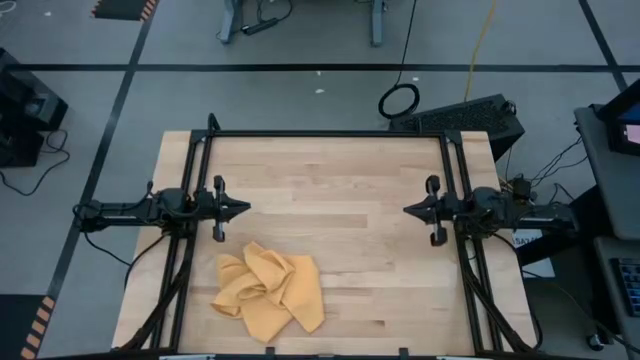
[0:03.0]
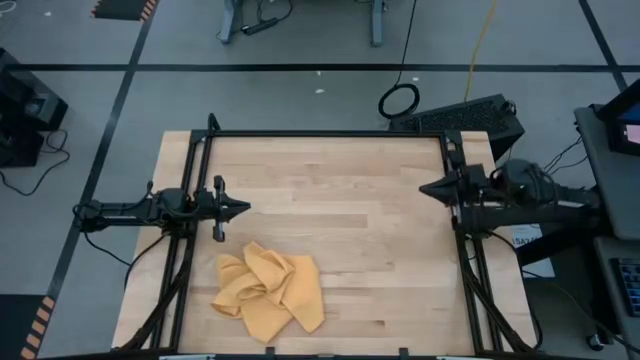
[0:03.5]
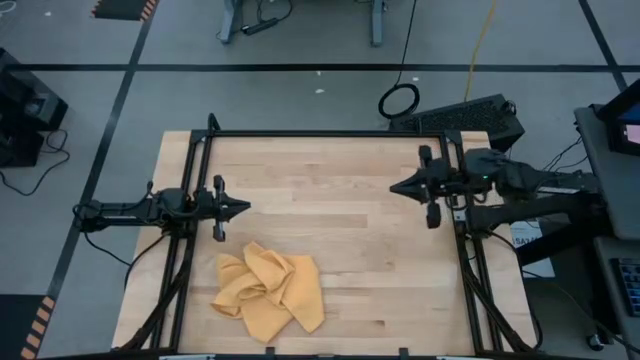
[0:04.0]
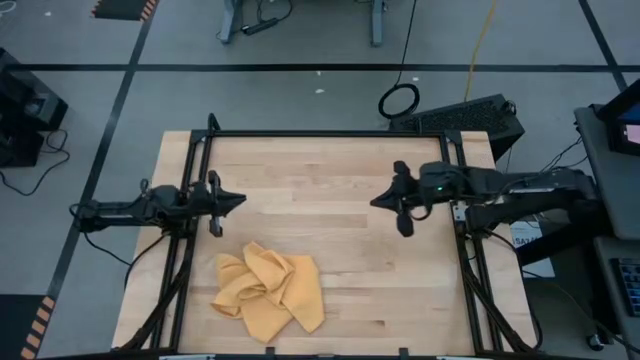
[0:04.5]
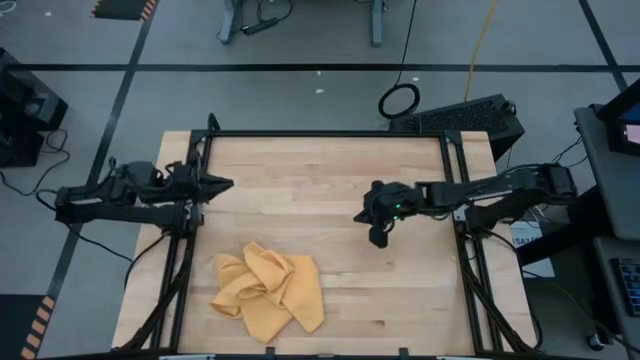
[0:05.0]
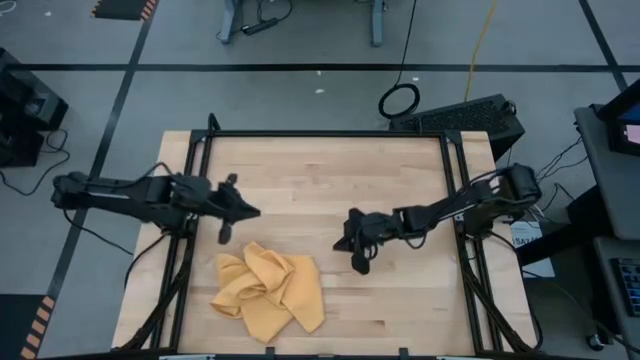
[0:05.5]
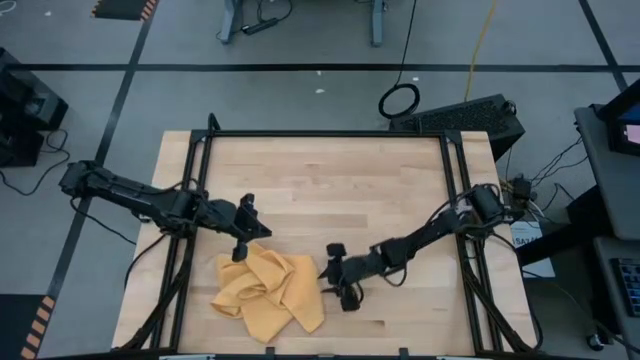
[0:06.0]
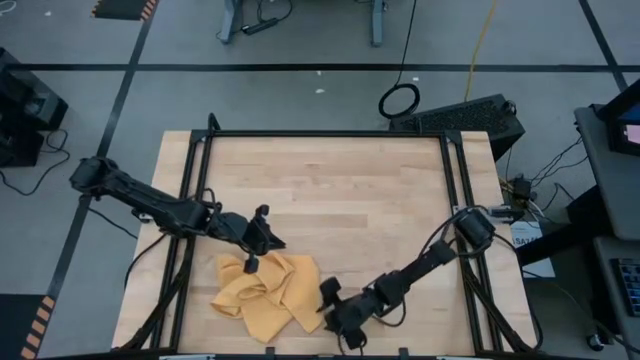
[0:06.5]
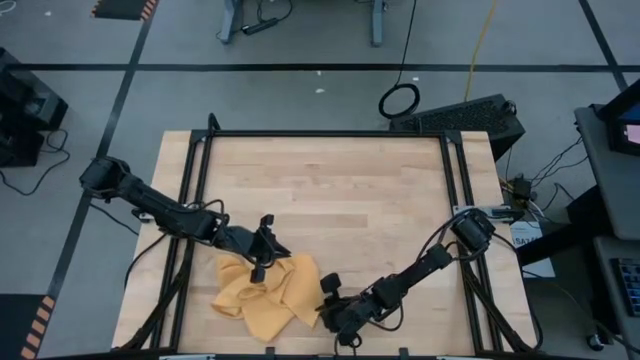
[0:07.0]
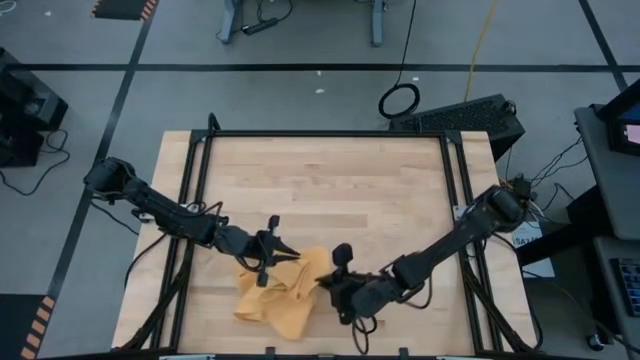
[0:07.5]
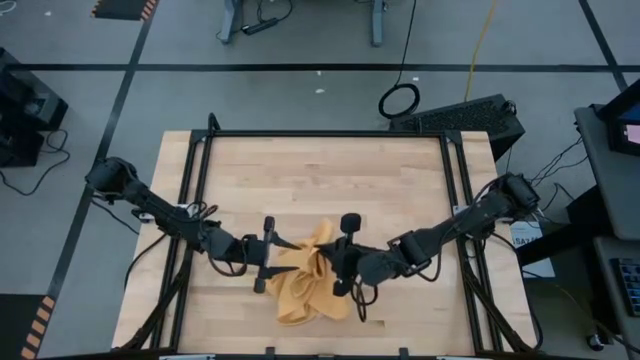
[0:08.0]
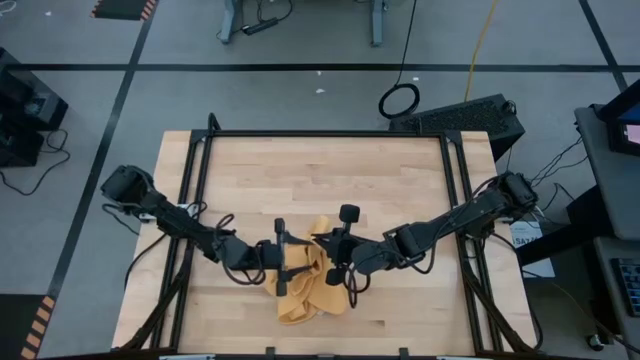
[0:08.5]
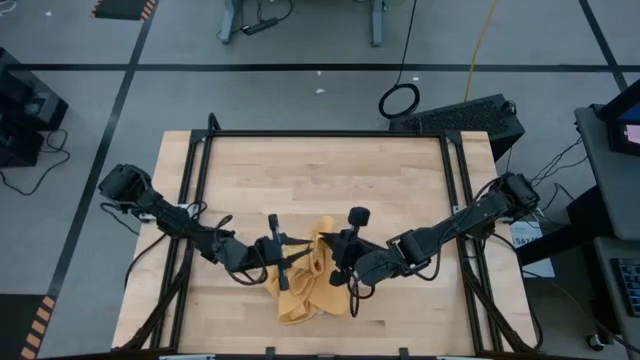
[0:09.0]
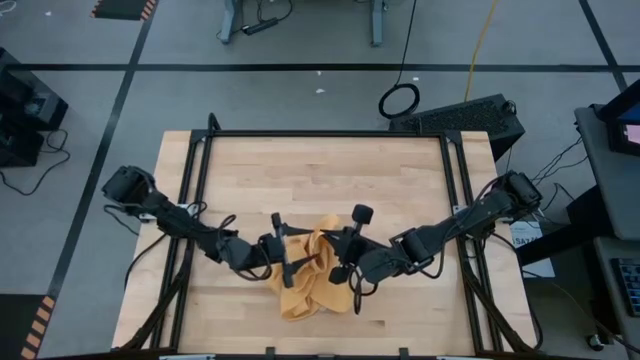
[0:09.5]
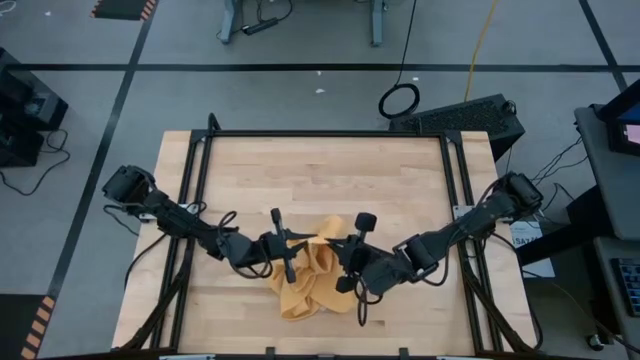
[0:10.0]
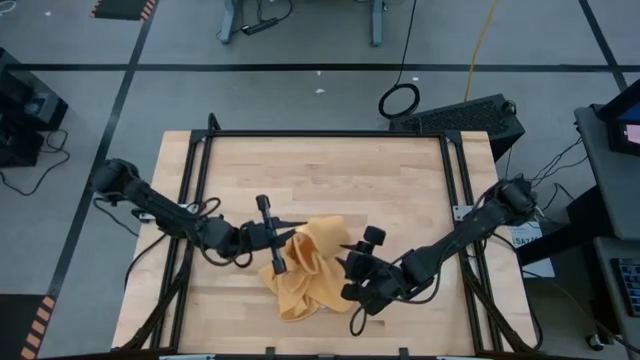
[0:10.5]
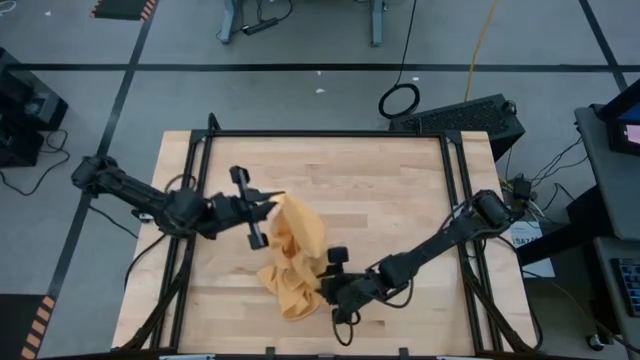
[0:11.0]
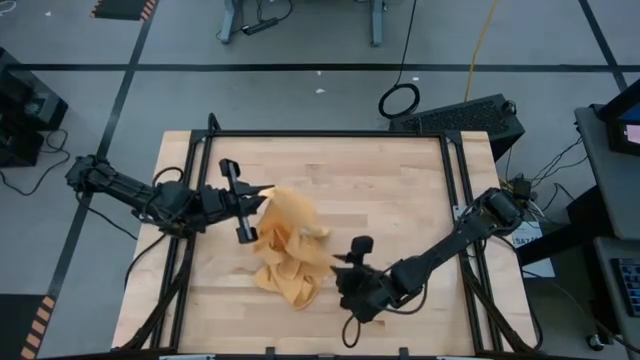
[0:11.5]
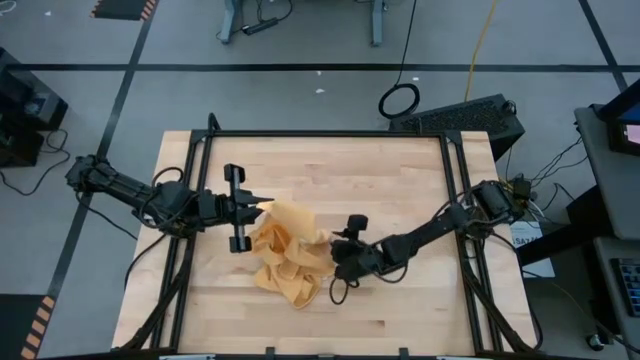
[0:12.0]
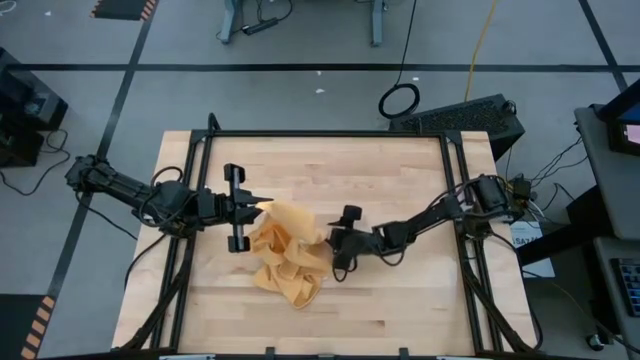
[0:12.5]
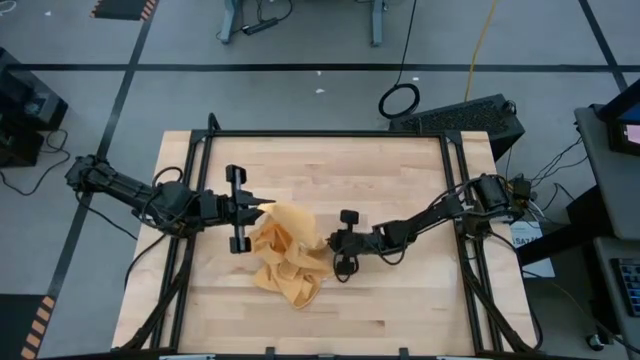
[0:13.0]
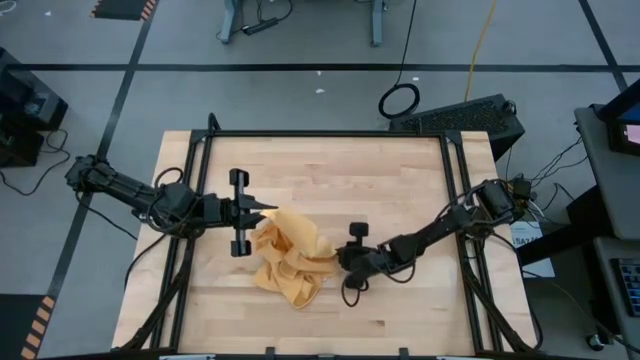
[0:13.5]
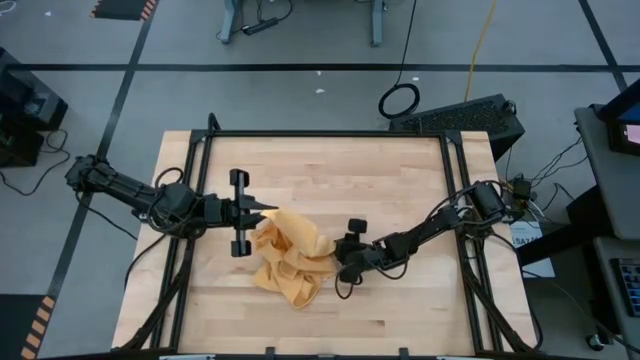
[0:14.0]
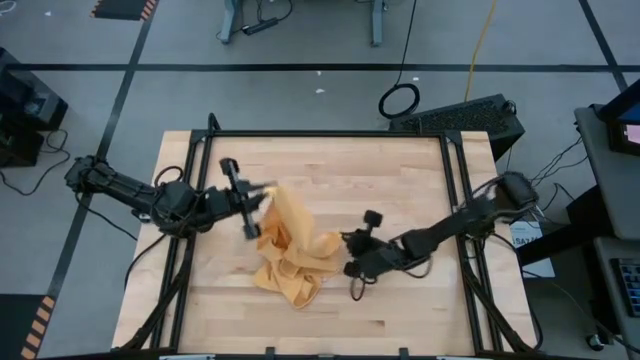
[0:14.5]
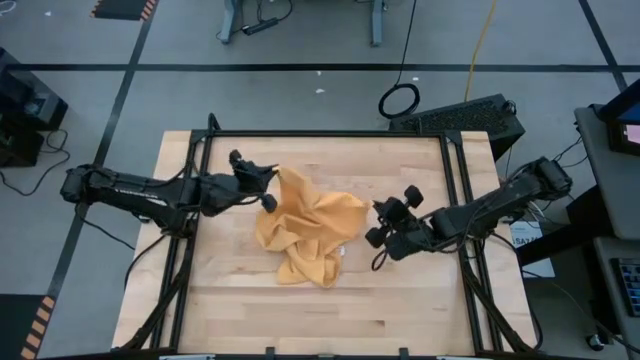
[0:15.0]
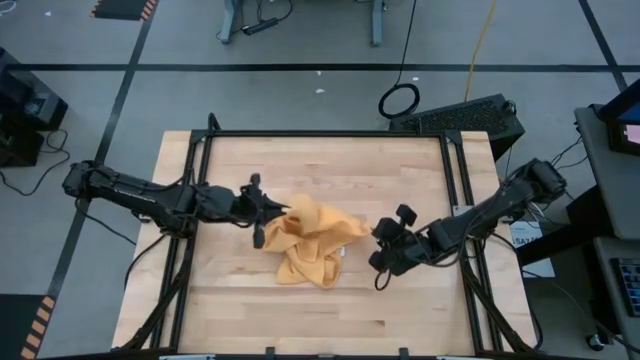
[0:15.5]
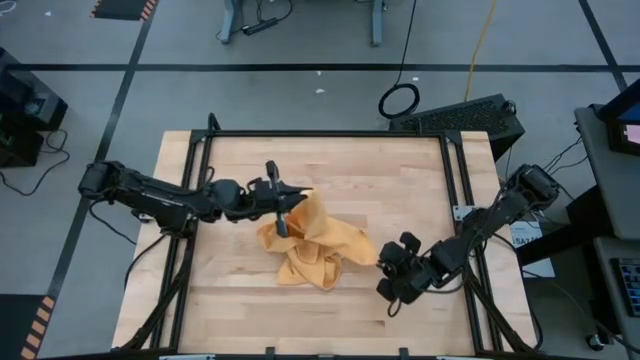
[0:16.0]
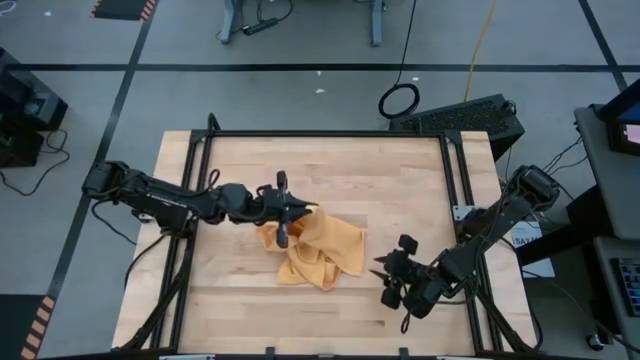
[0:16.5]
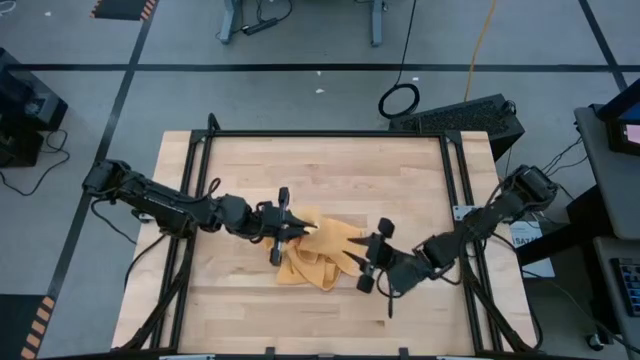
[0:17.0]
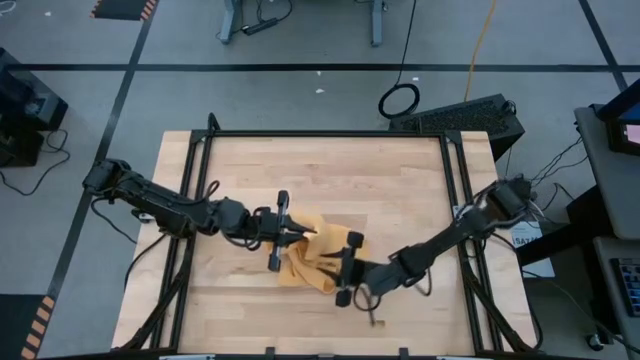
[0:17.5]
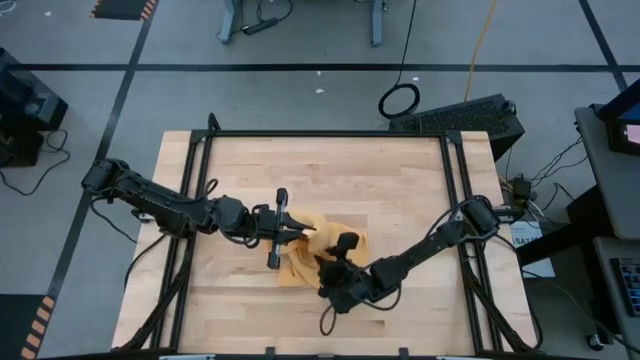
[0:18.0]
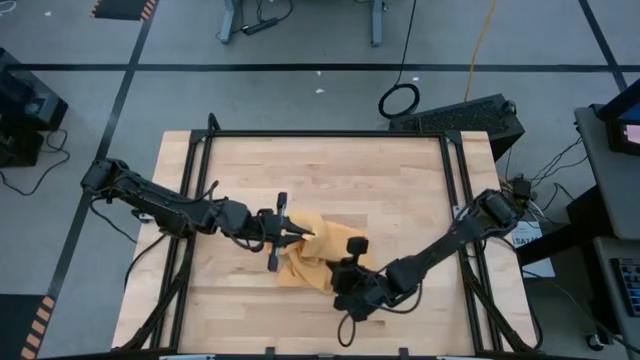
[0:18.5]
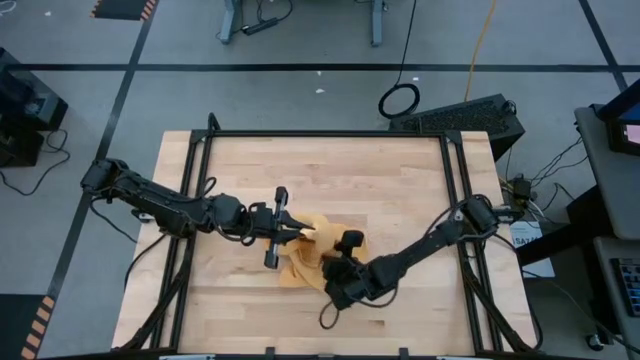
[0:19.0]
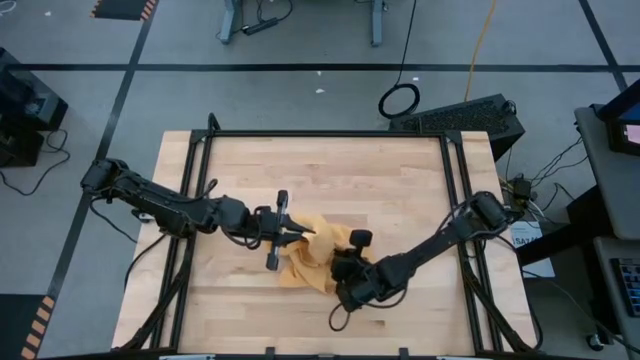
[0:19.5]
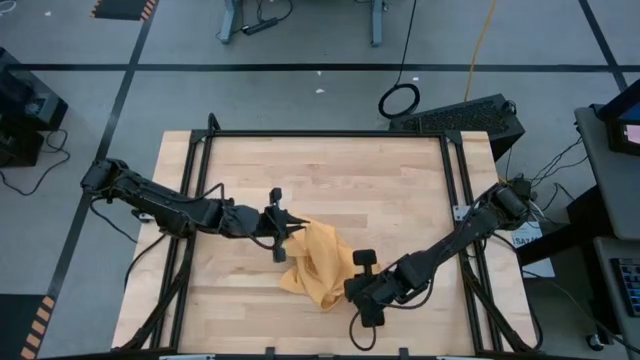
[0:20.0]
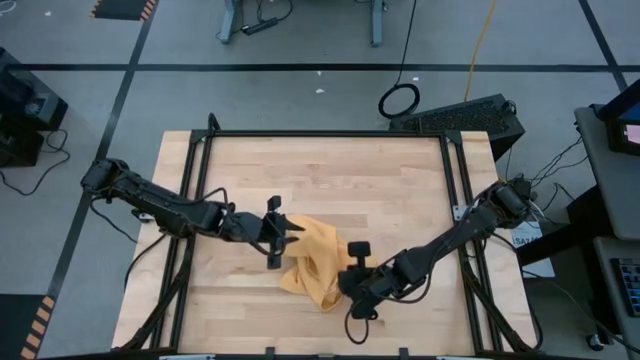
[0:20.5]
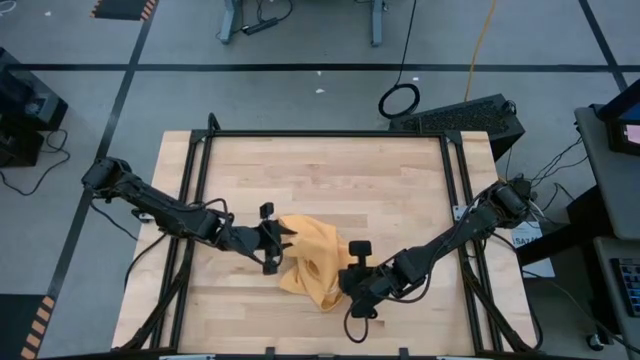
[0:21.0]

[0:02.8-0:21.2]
Task: Roll towel
Roll the yellow towel
